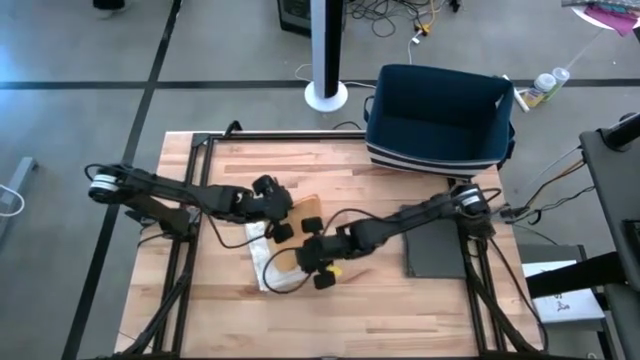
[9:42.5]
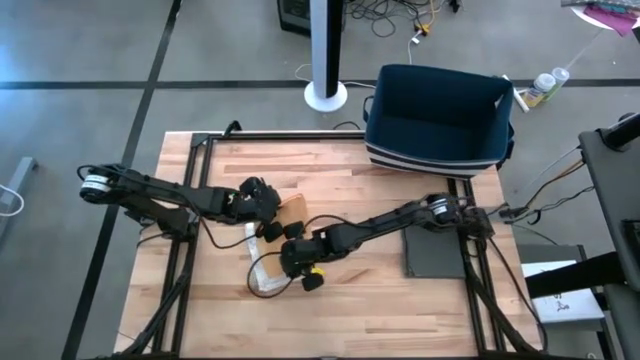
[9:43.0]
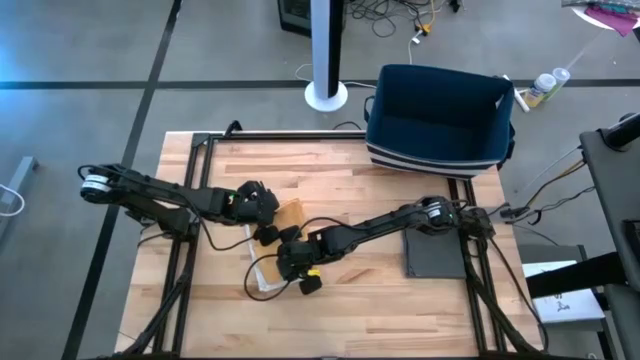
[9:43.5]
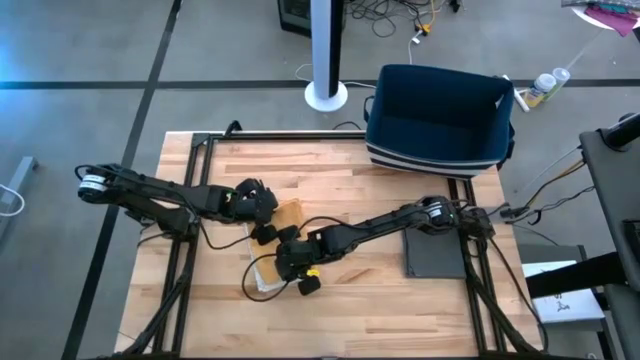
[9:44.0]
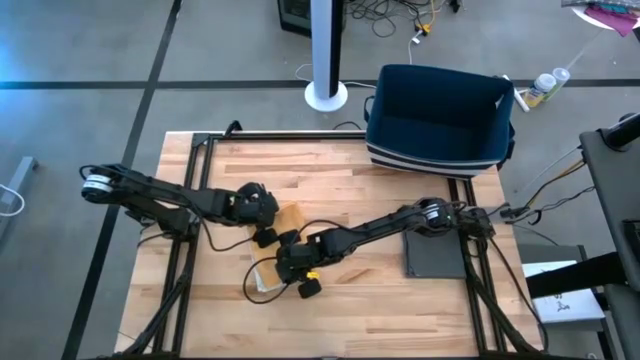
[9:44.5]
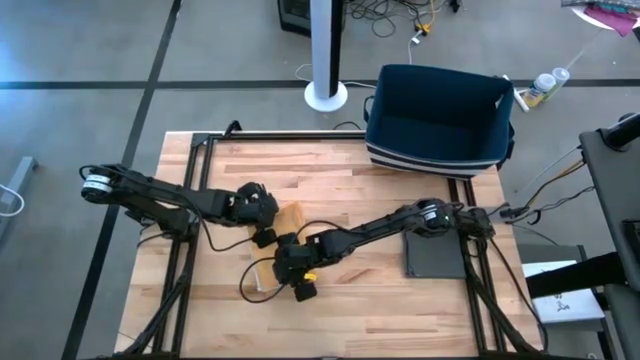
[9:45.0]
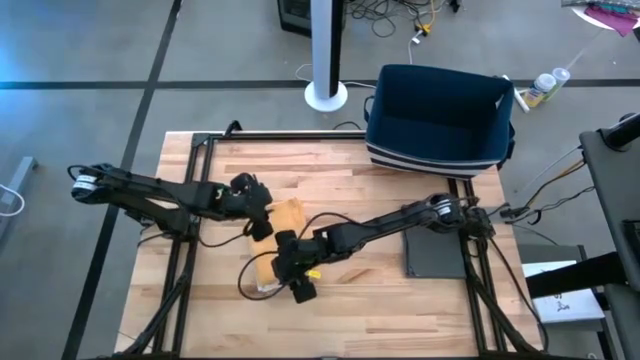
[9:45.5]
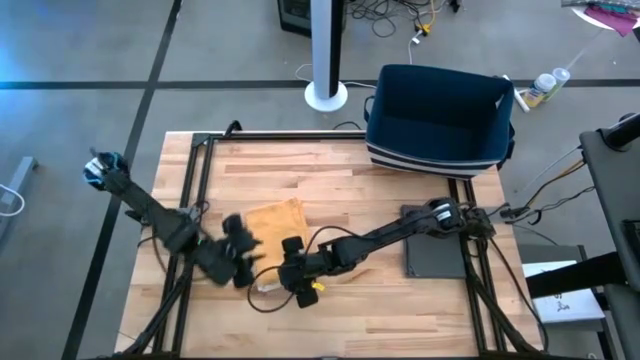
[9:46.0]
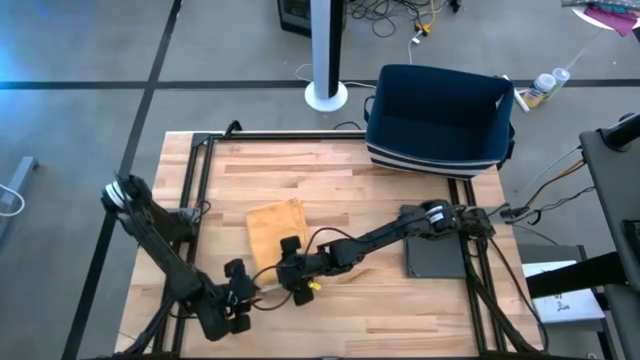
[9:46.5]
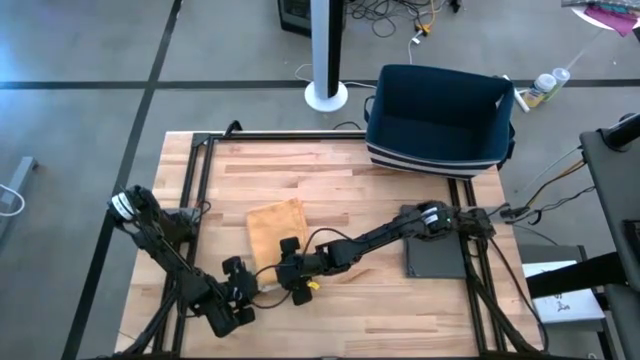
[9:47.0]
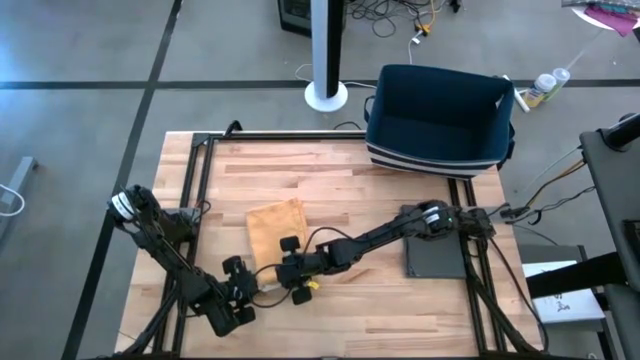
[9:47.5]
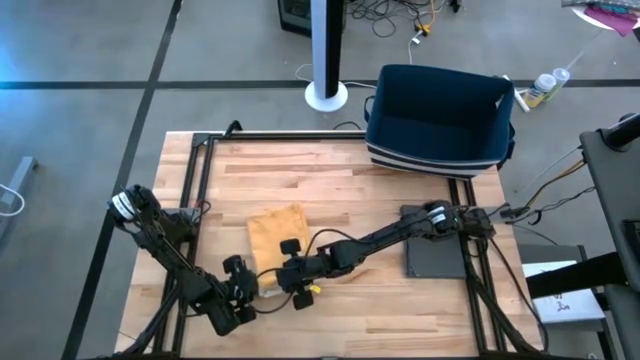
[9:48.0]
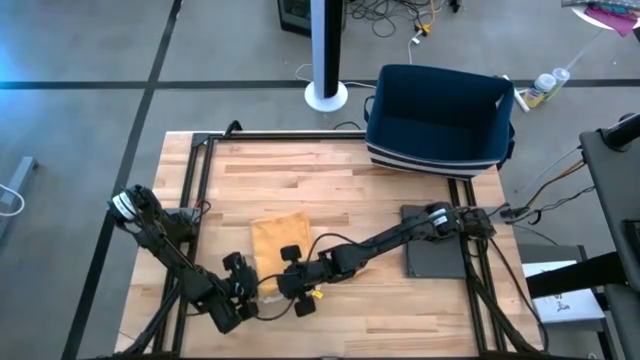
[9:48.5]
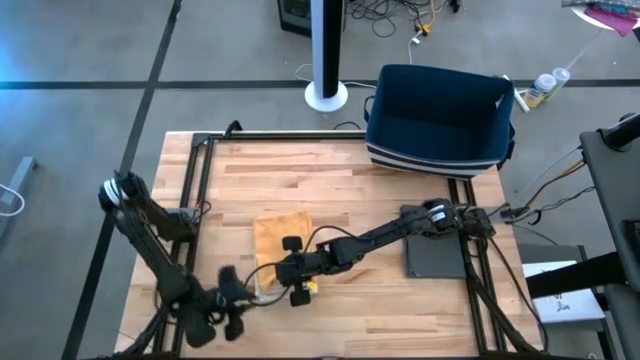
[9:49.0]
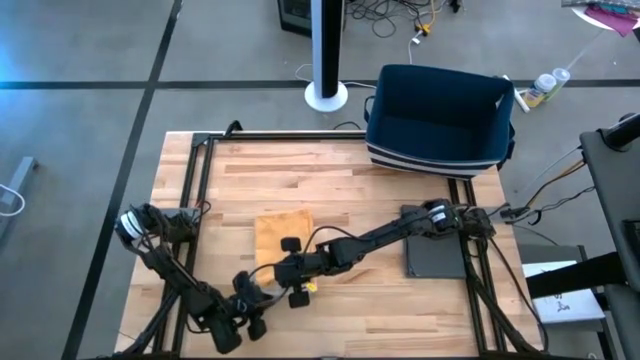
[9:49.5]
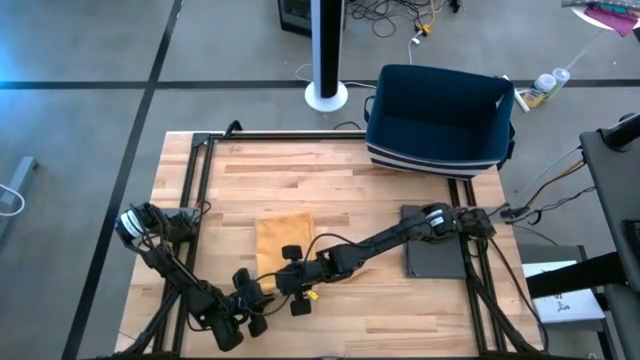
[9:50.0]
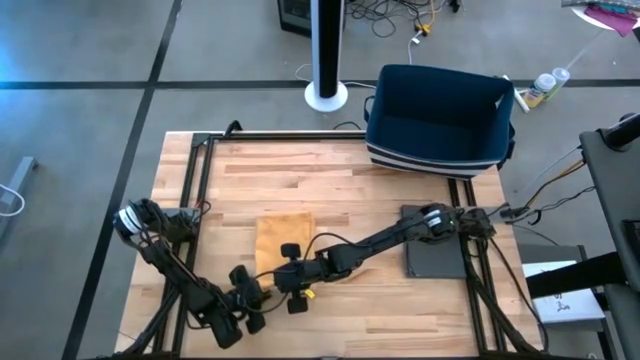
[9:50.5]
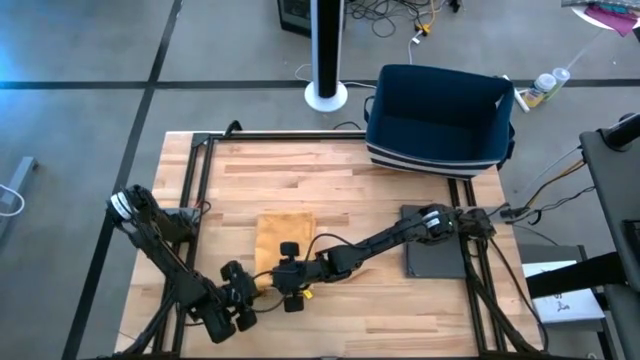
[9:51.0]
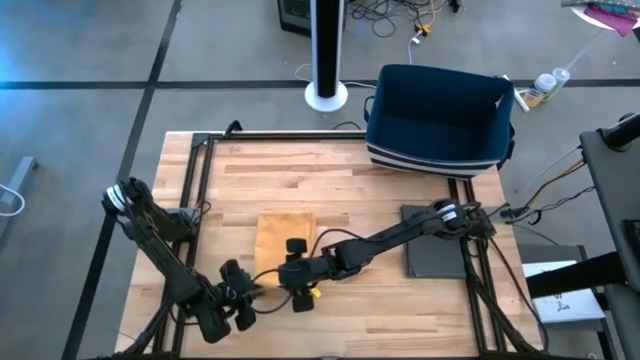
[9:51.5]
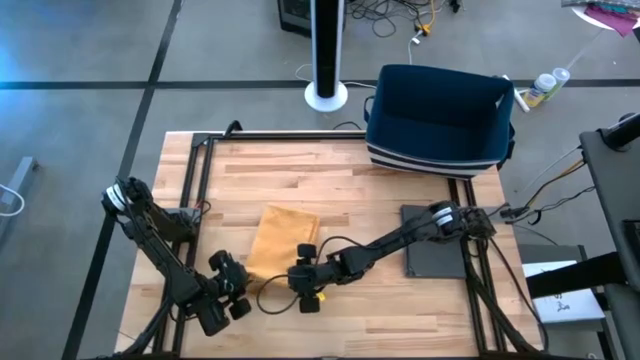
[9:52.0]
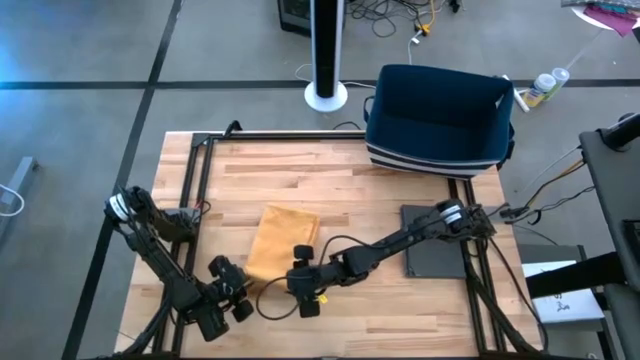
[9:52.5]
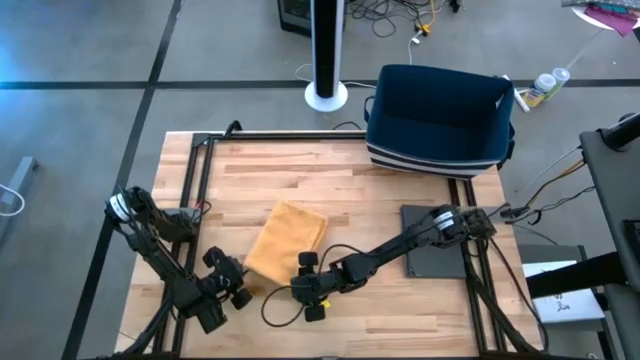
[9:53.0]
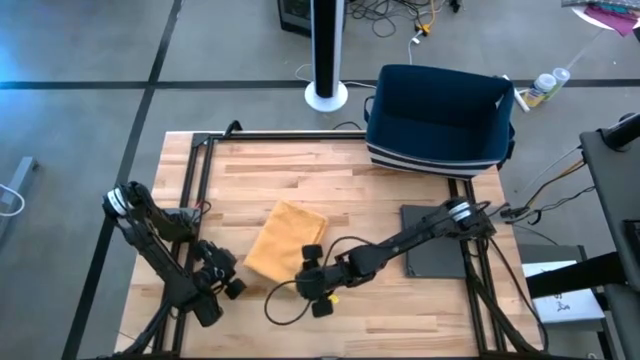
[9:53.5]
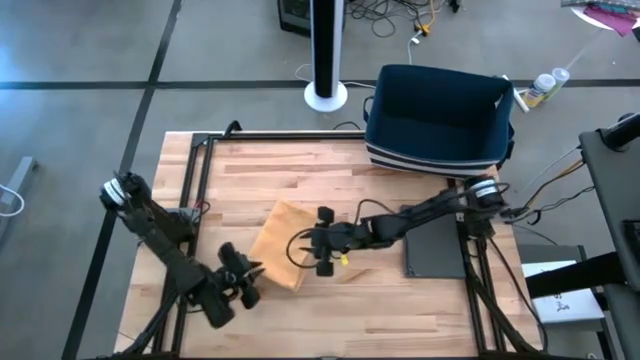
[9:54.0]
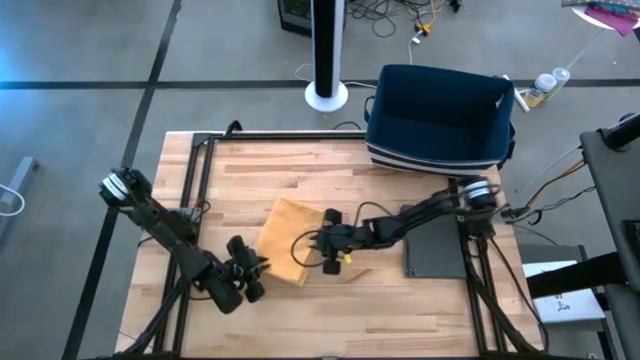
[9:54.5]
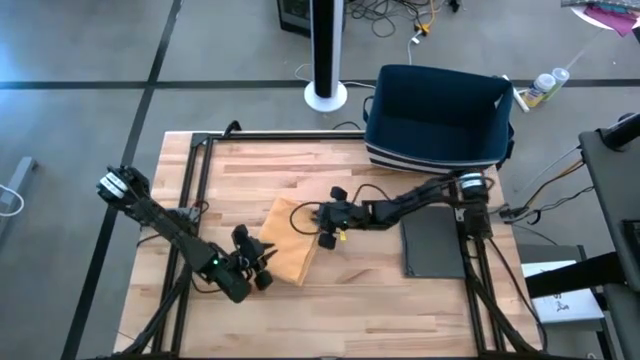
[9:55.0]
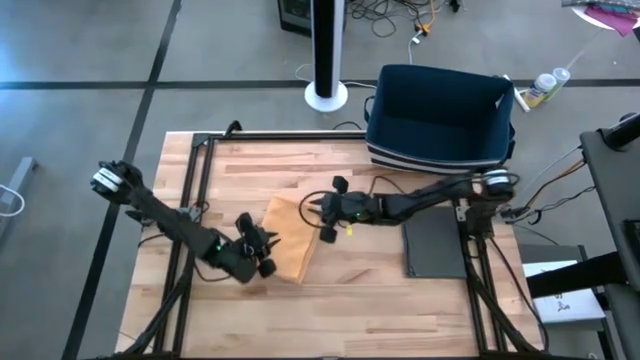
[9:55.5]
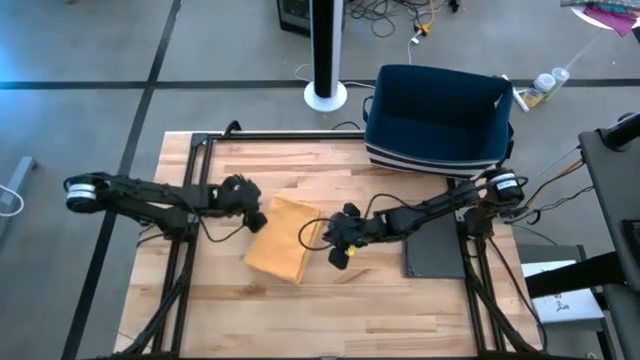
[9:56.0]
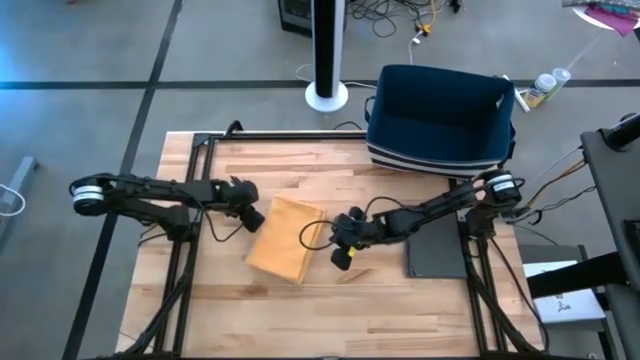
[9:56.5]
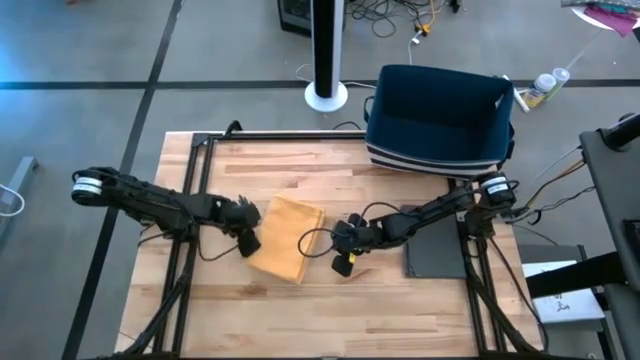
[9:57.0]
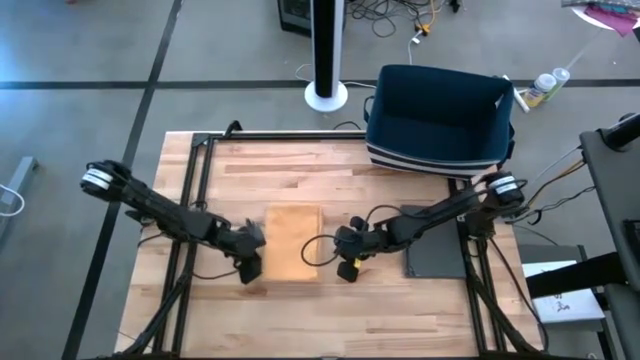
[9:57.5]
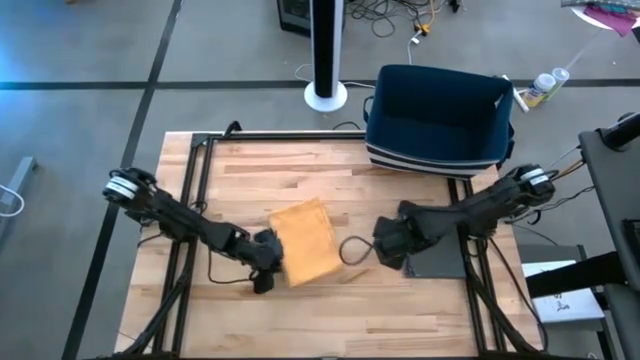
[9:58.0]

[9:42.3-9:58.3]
Task: Fold towel
Stack the yellow towel on the white towel

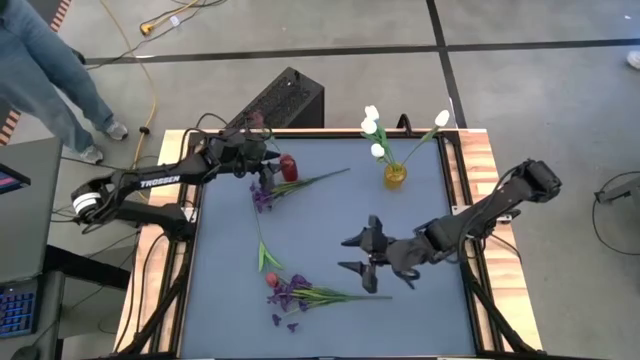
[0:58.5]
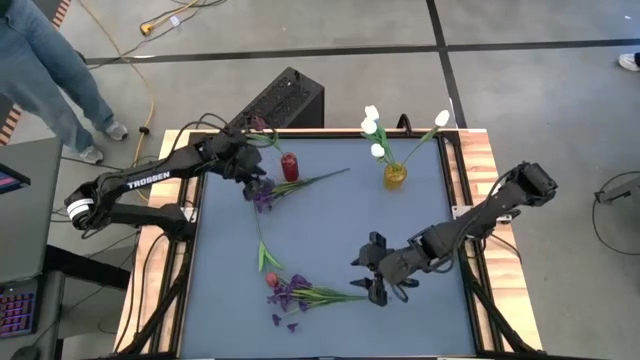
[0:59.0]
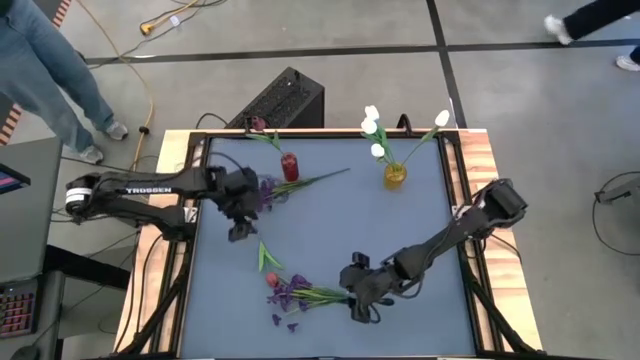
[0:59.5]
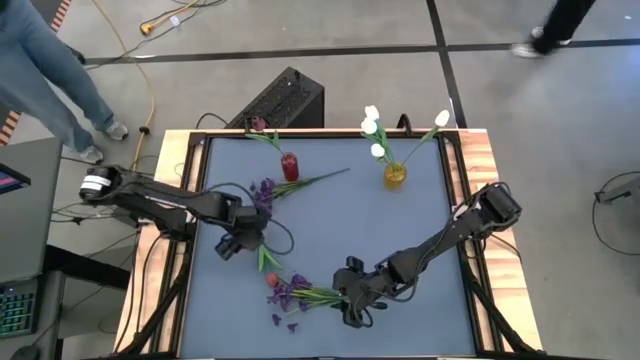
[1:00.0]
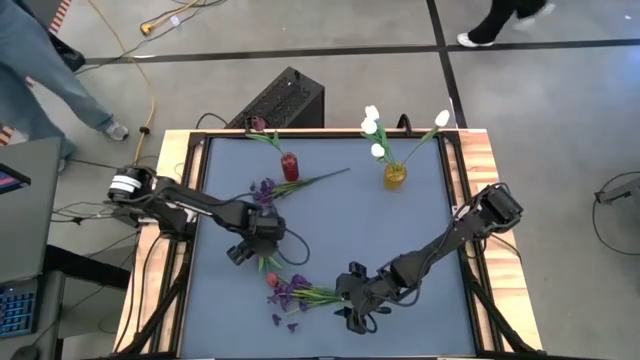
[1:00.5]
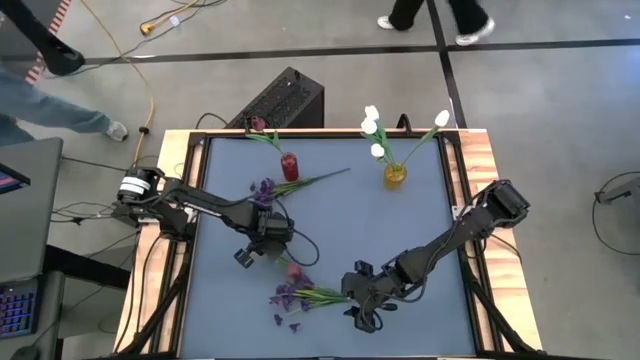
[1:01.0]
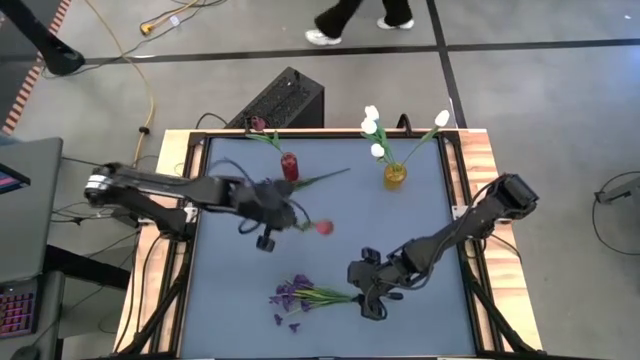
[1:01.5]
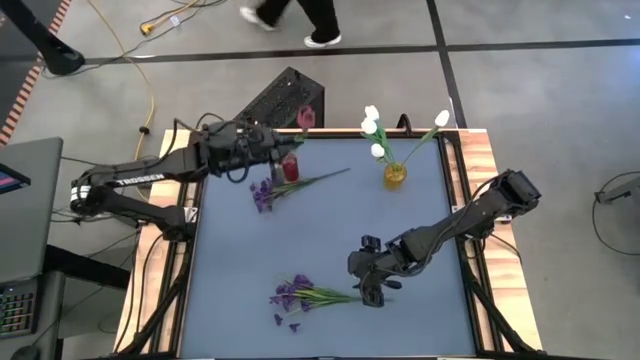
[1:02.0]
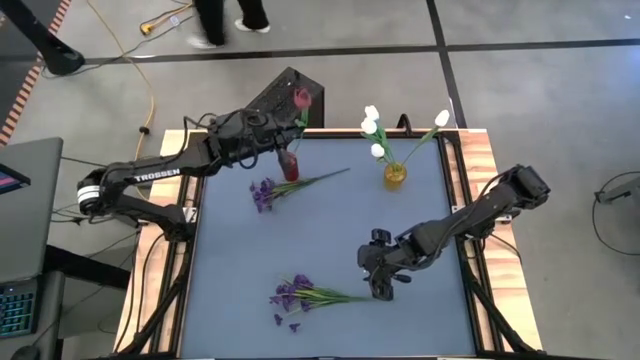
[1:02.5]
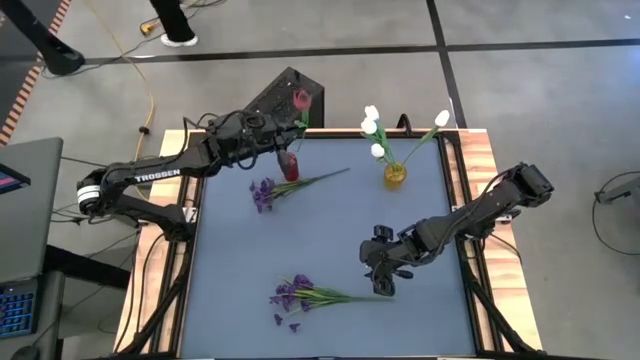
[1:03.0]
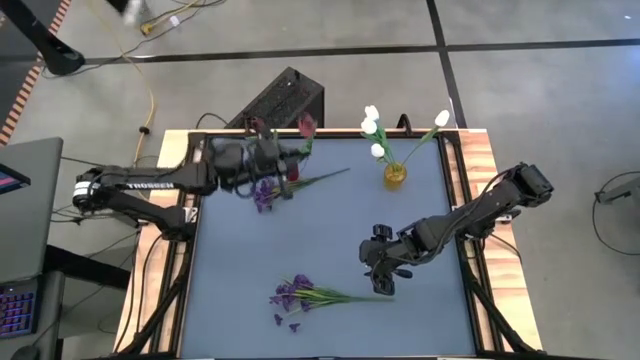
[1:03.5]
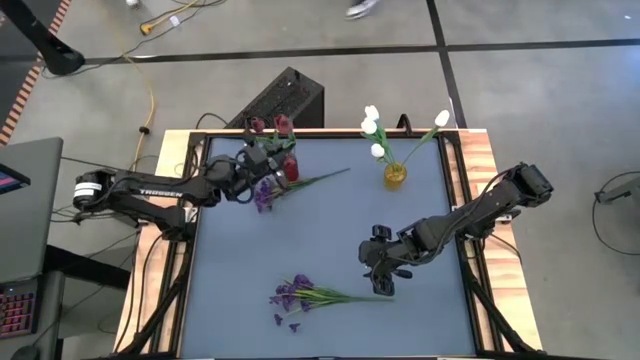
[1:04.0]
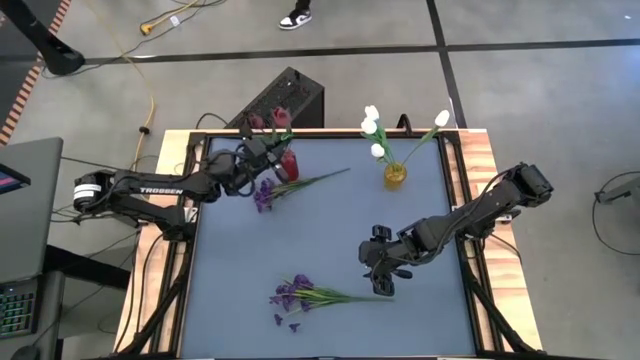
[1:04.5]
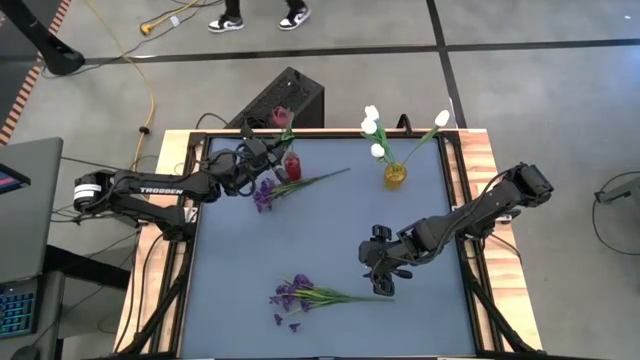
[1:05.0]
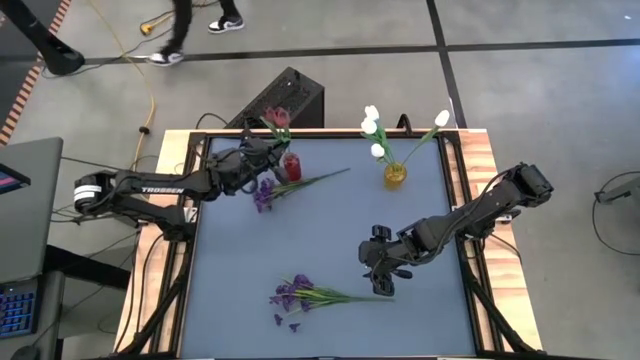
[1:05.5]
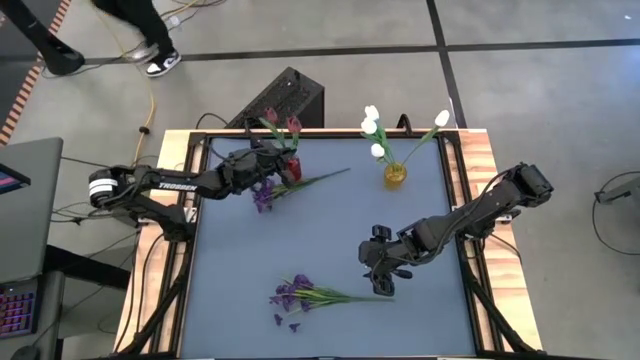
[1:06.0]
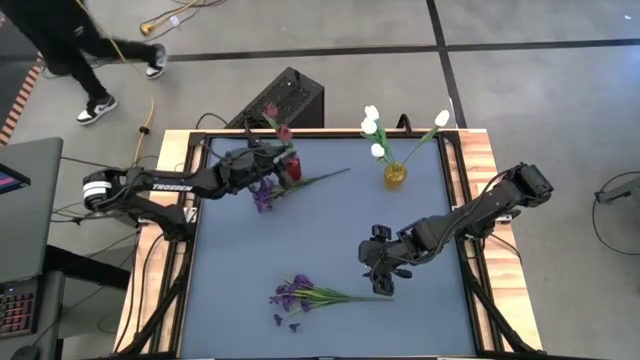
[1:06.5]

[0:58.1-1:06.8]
Task: Sort flowers into vase by color
Put the red flower into the red vase
